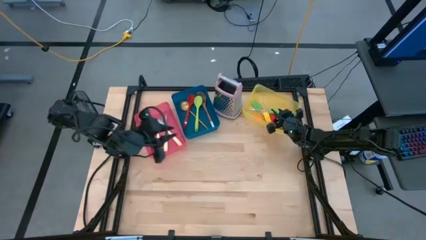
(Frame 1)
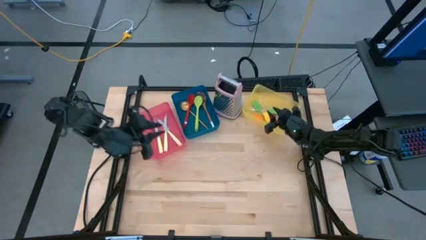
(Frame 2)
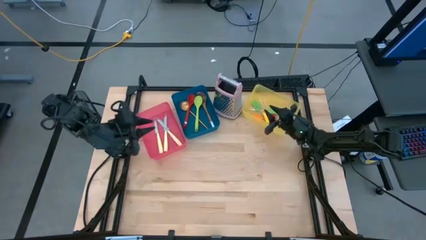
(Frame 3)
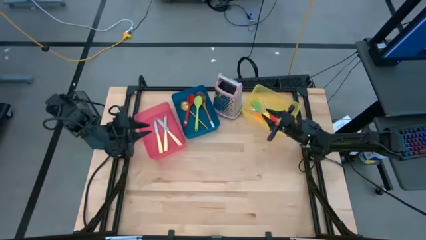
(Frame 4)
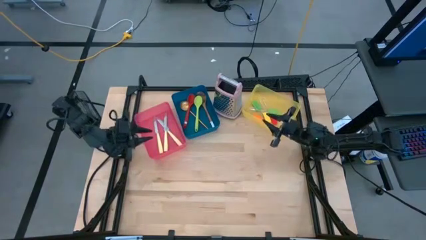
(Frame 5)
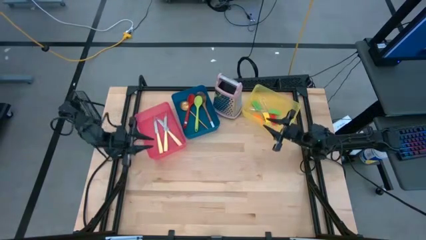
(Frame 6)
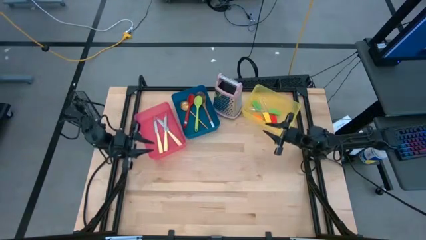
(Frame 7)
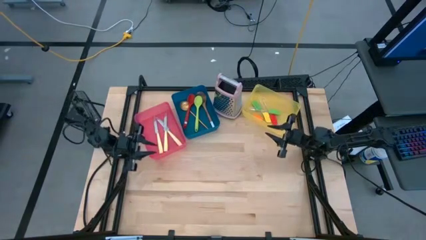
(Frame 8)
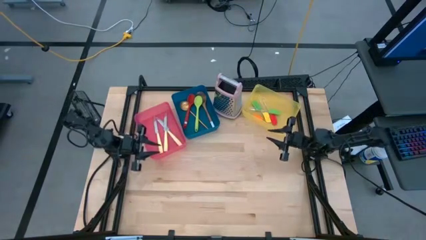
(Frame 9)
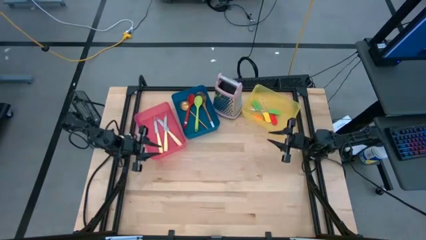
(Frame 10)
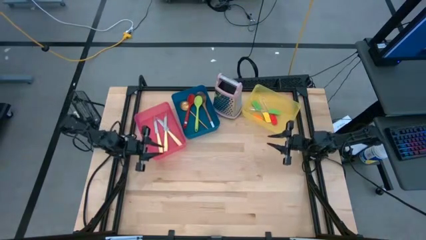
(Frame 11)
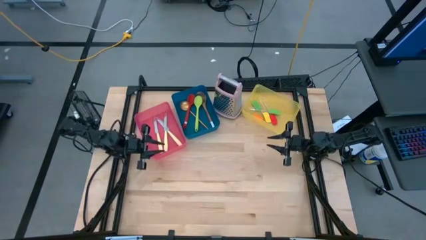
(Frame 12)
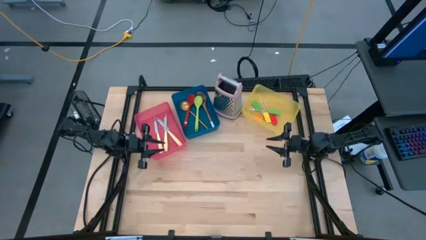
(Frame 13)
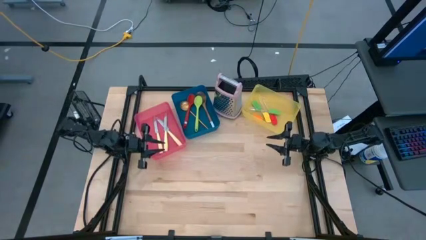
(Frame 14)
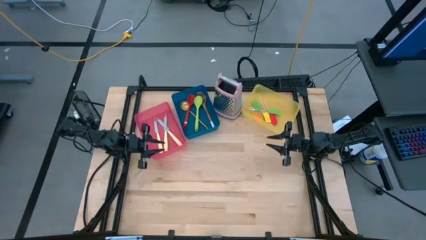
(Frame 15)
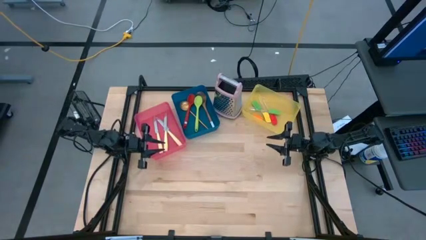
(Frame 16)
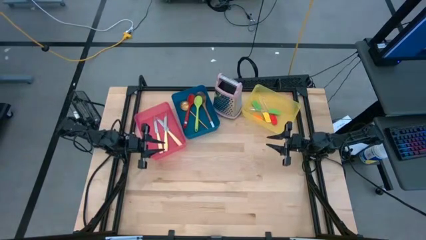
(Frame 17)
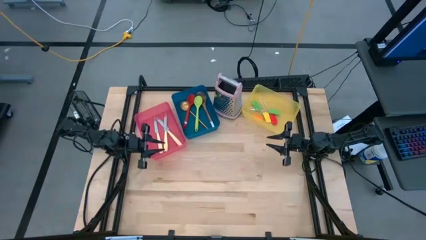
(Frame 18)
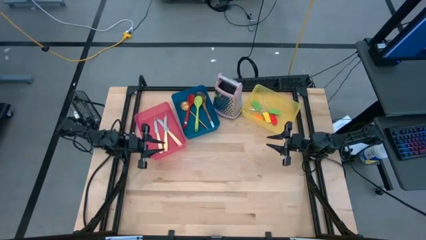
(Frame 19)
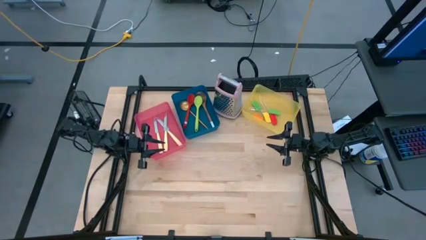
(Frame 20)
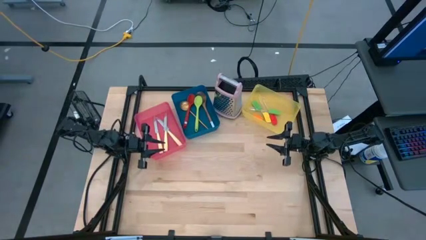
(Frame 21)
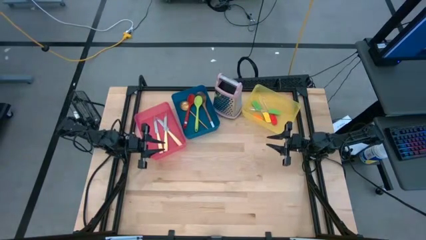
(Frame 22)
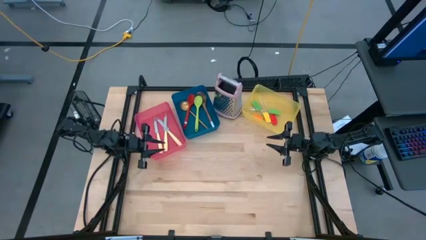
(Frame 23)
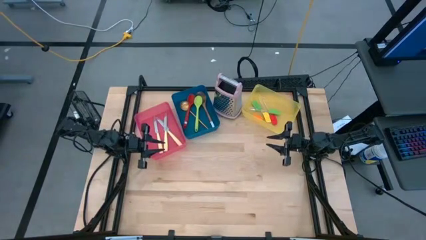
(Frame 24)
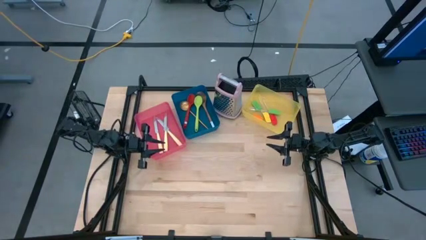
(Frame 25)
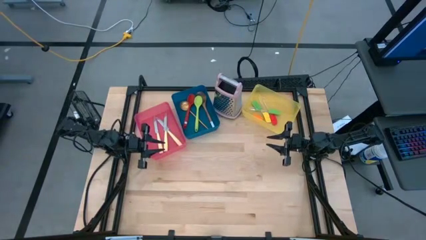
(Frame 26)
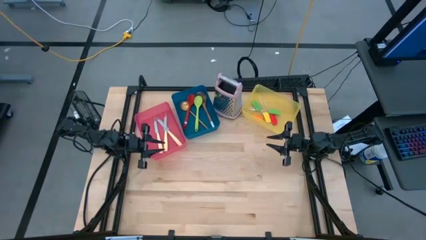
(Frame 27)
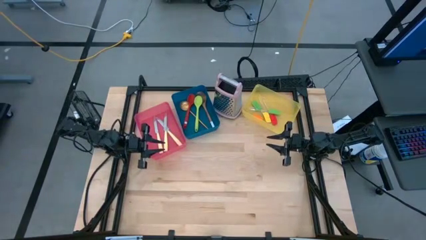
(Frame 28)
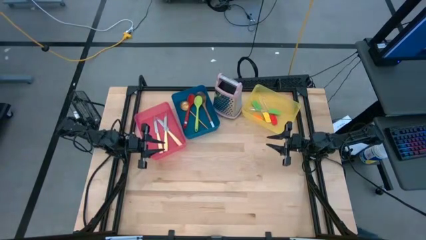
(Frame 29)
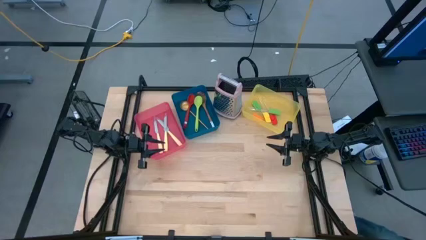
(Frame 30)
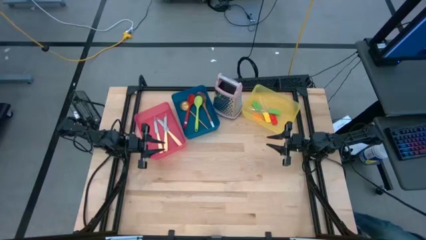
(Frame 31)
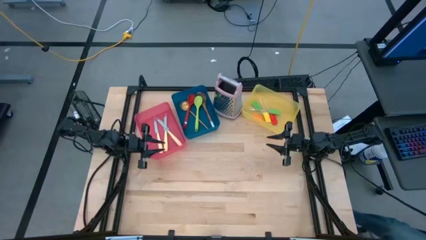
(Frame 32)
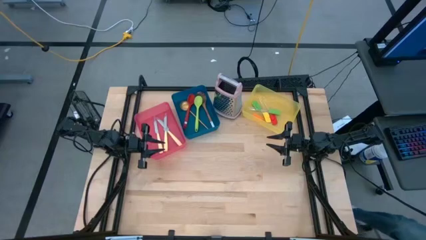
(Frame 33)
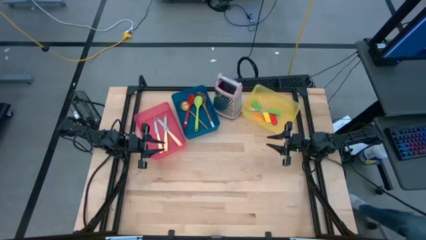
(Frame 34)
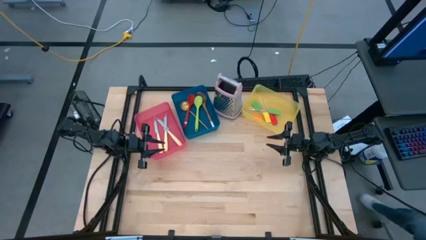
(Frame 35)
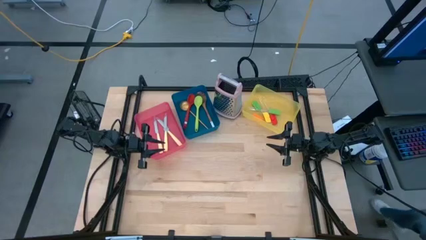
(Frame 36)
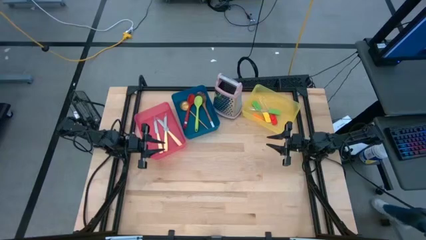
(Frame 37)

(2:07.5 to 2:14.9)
Task: Pick & Place Kitchen Items
Return to home position

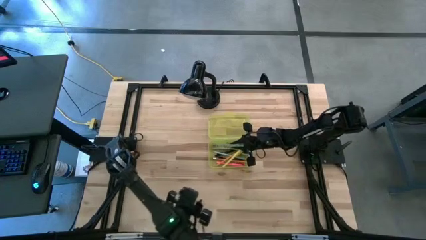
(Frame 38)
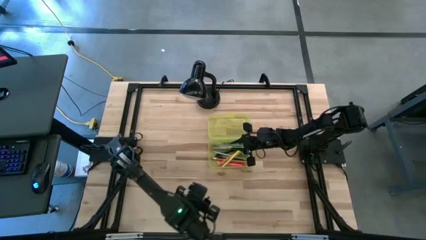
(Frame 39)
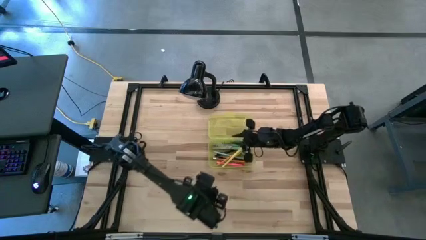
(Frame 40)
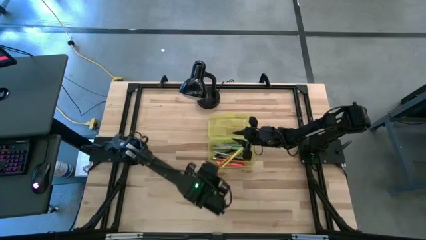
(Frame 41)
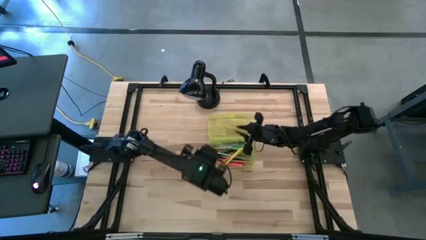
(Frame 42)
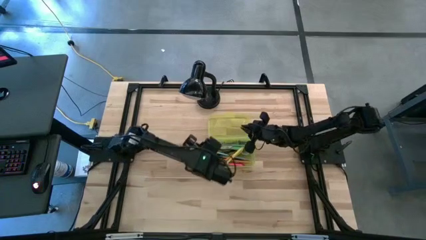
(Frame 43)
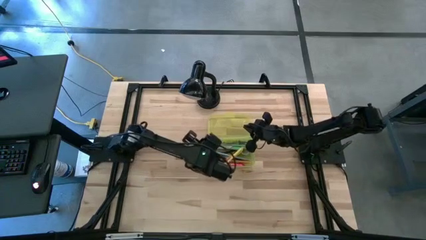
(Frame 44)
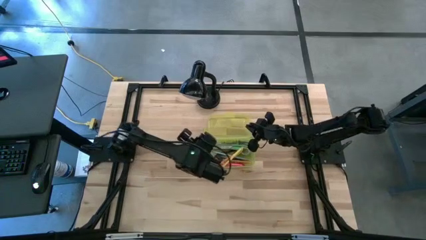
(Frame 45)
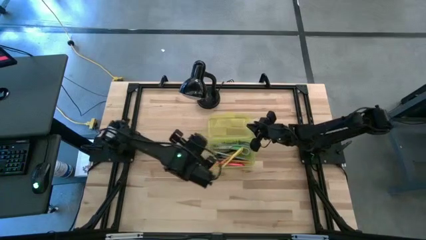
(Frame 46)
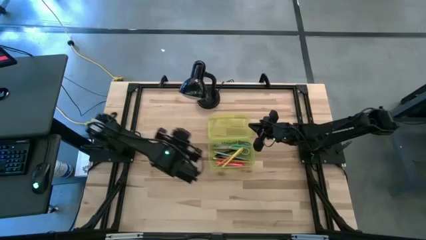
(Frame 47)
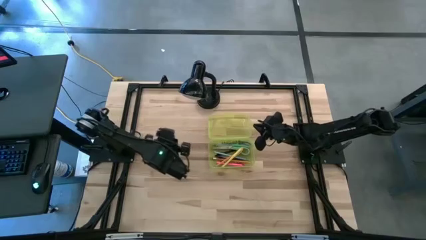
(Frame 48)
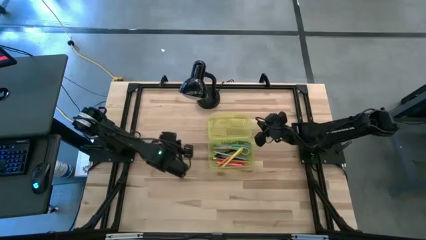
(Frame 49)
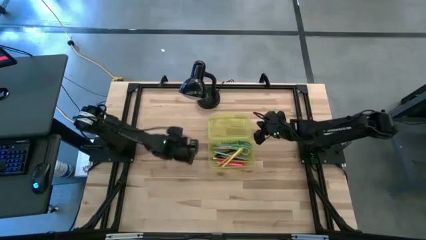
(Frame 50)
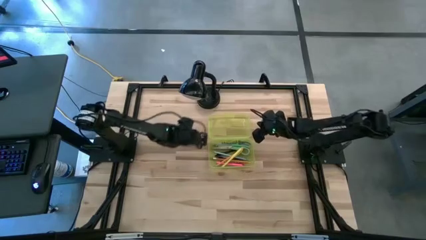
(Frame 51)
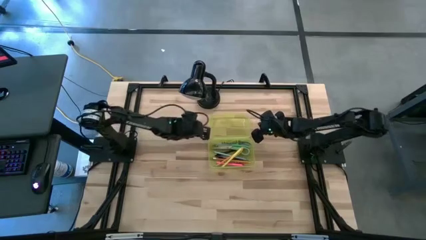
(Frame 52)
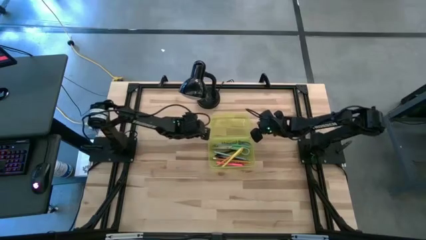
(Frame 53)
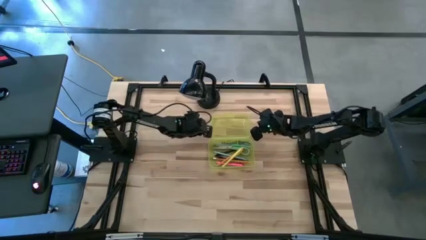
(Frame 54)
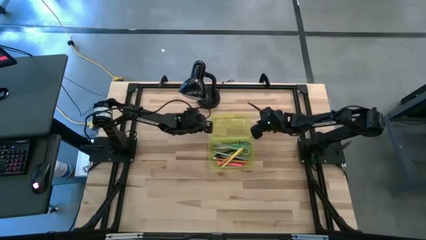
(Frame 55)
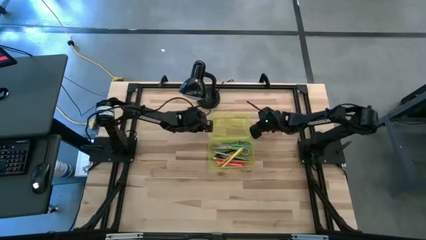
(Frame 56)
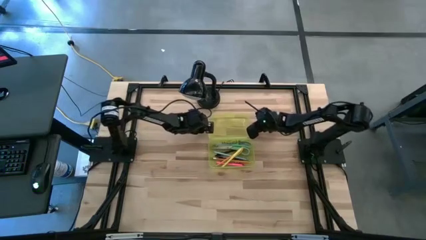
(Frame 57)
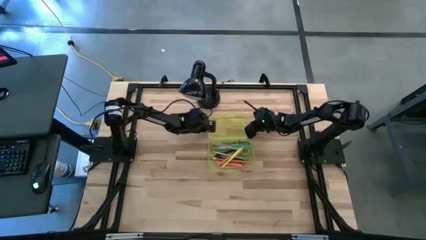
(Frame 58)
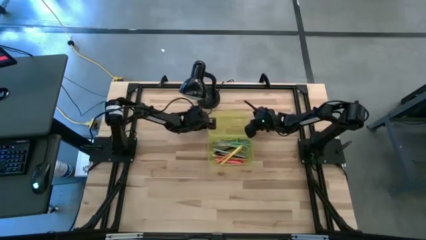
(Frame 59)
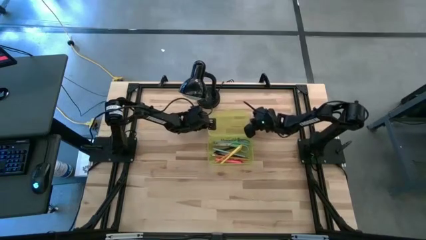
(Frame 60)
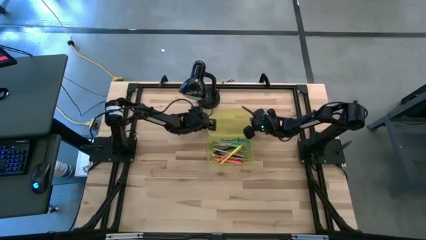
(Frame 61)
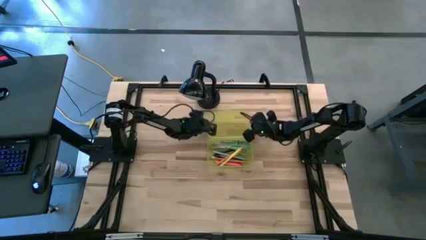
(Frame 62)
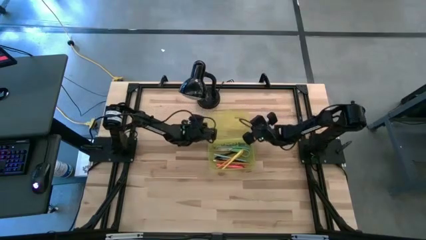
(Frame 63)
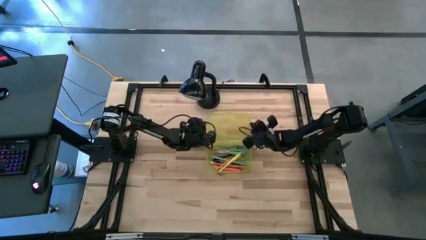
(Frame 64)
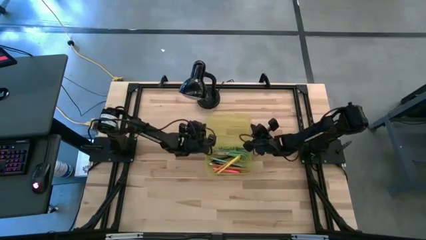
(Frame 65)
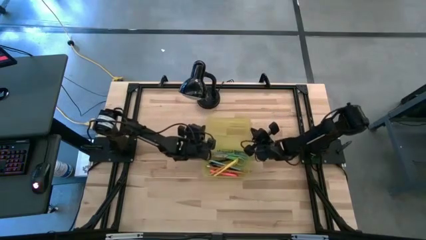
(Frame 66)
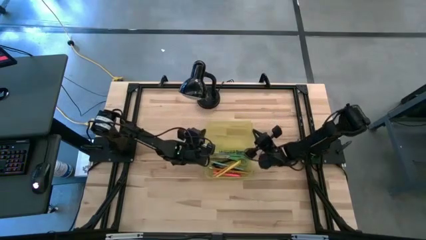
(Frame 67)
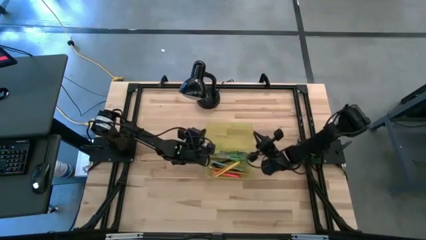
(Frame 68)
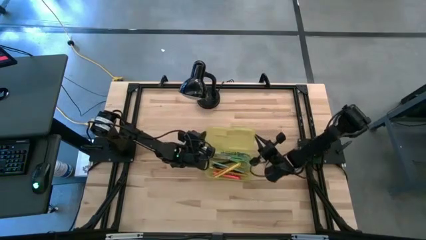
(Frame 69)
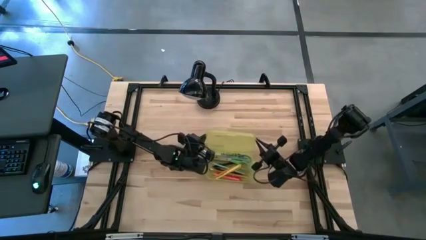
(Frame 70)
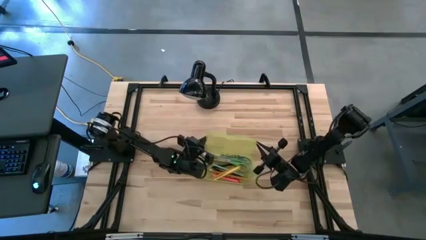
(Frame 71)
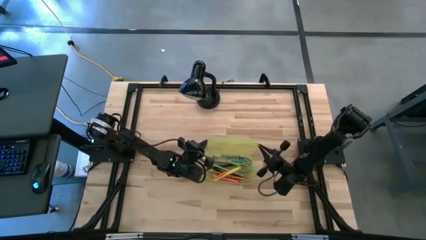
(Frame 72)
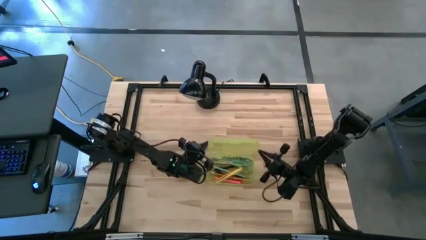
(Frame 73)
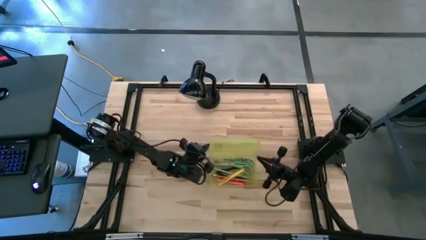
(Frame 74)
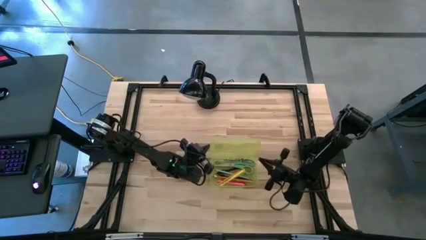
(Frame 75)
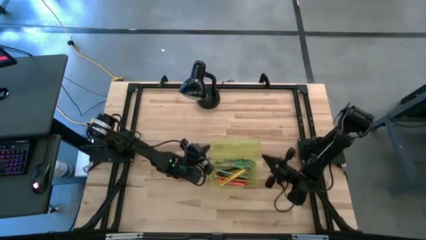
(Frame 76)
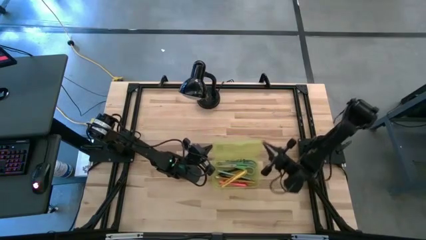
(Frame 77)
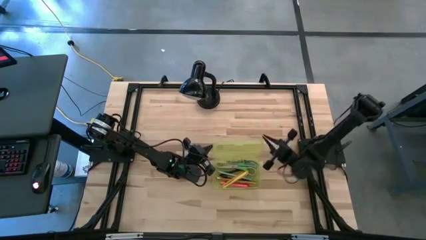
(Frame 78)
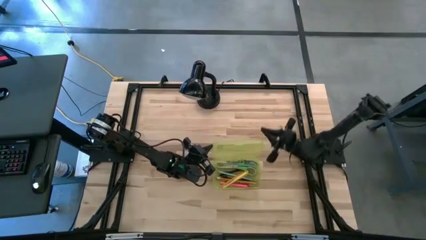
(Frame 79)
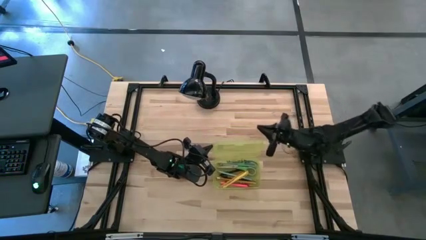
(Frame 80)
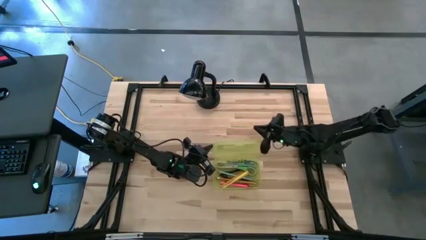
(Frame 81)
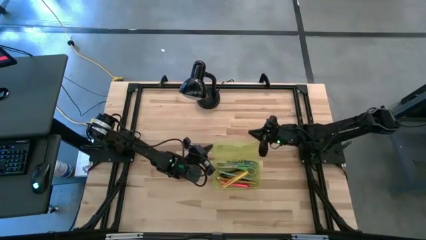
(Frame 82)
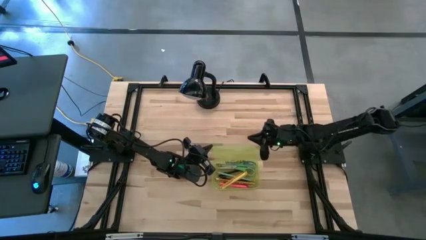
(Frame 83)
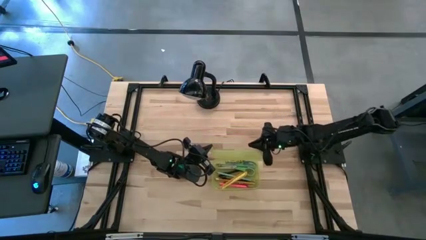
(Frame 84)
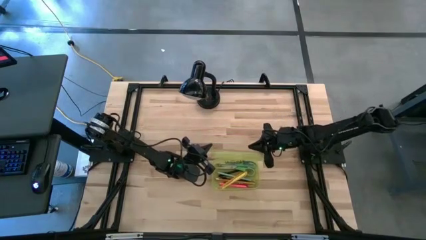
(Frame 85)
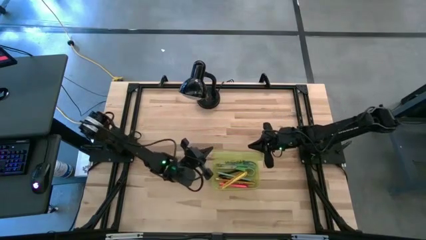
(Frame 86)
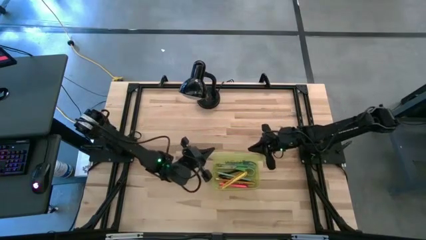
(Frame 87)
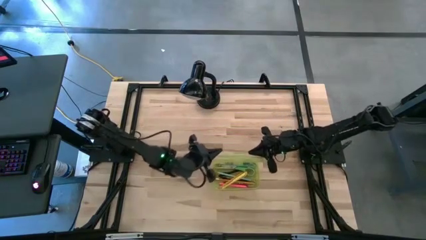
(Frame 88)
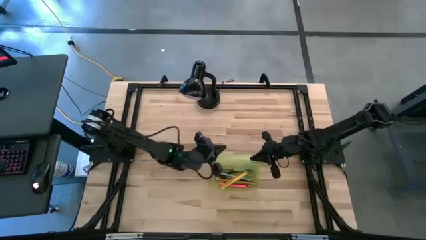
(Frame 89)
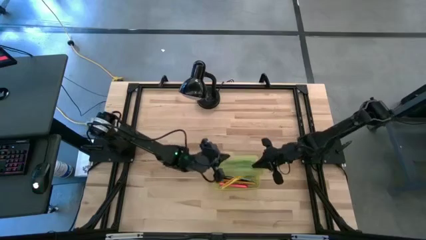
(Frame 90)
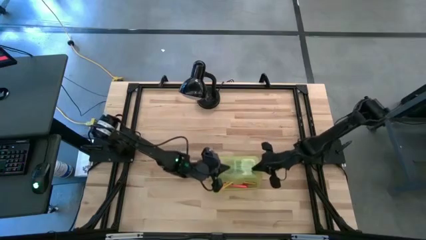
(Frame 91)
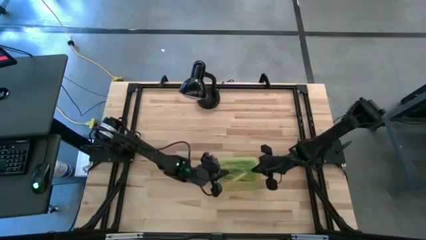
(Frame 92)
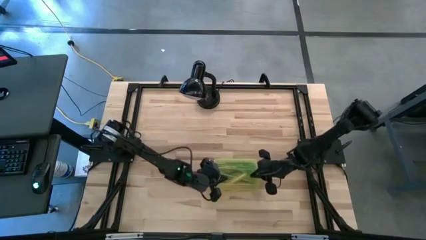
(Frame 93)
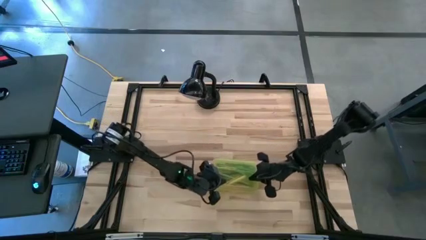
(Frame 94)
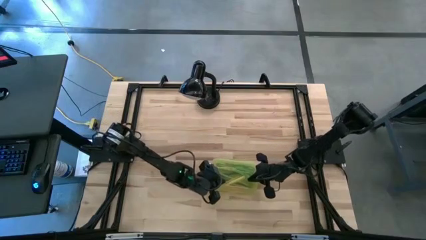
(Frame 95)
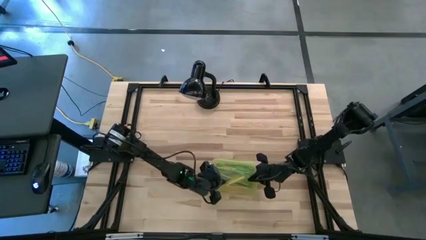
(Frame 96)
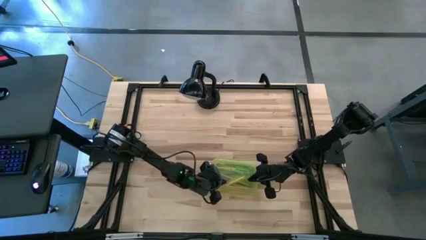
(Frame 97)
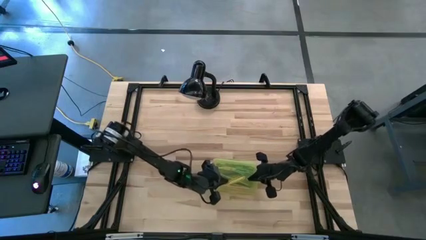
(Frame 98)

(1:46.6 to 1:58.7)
Task: Pick & place school supplies into a supply box
Close the yellow supply box
